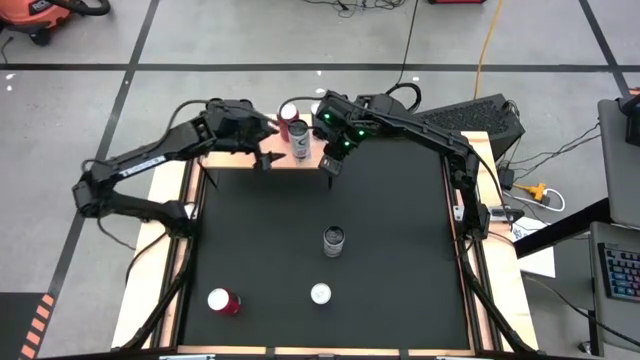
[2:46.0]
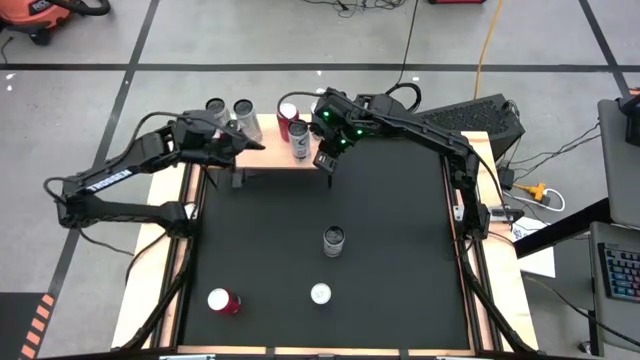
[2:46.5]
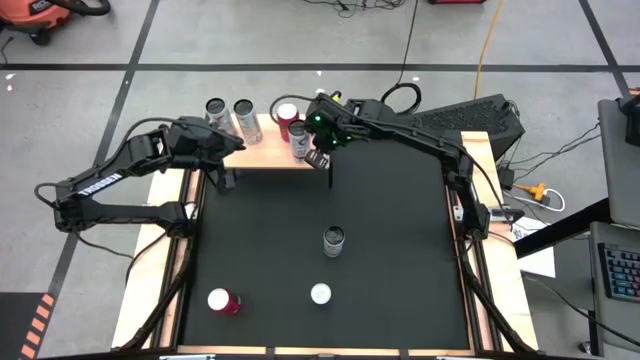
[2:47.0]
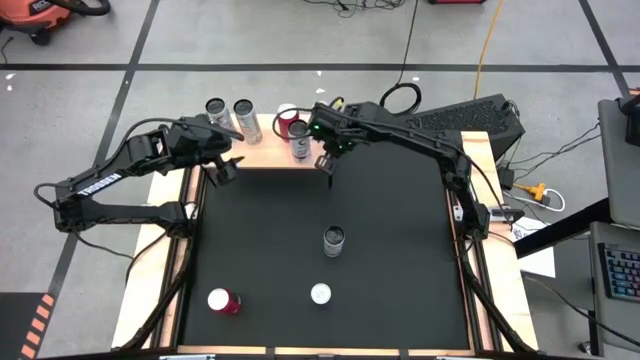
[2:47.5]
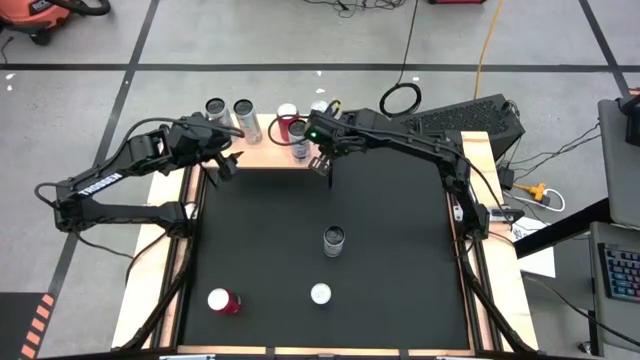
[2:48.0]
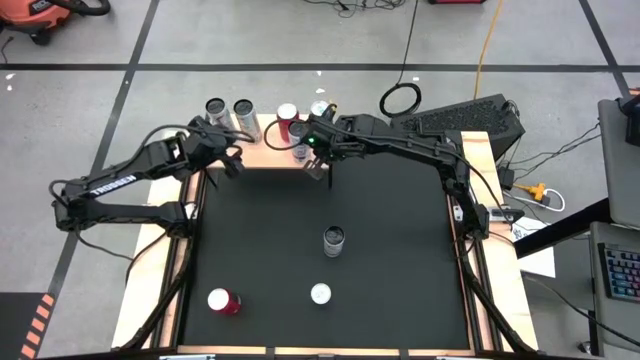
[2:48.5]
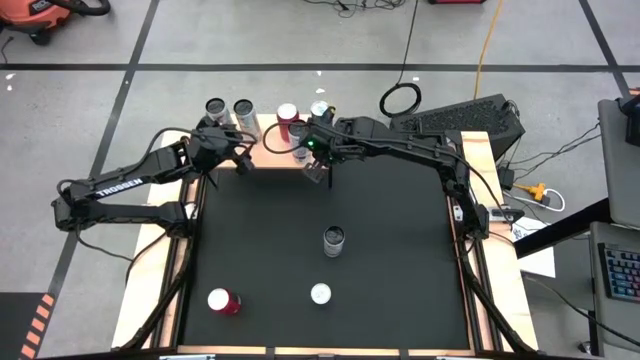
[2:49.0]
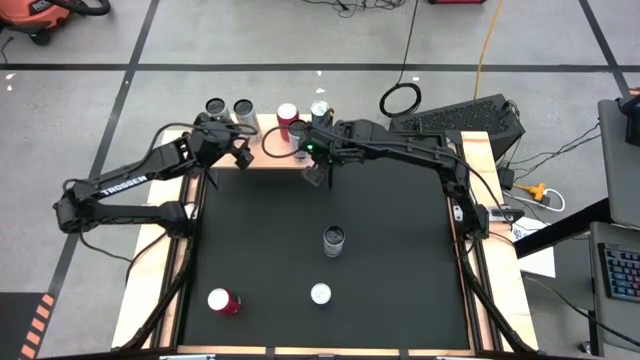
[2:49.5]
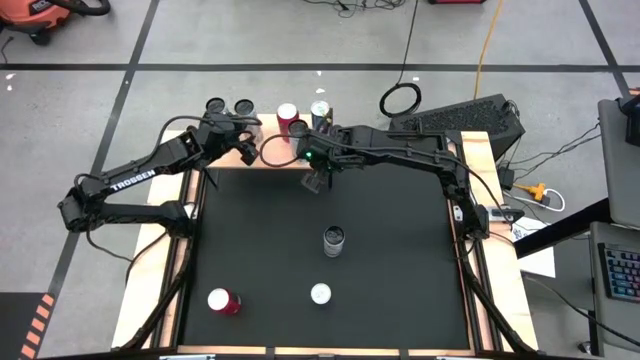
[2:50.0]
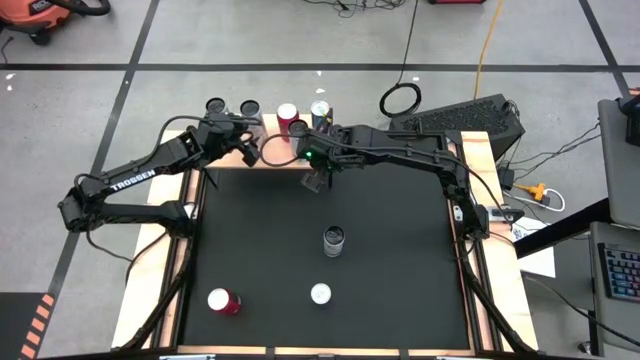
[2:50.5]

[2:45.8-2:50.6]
Task: Place canned beverage on shelf
Adjust the white yellow soda can on the shelf

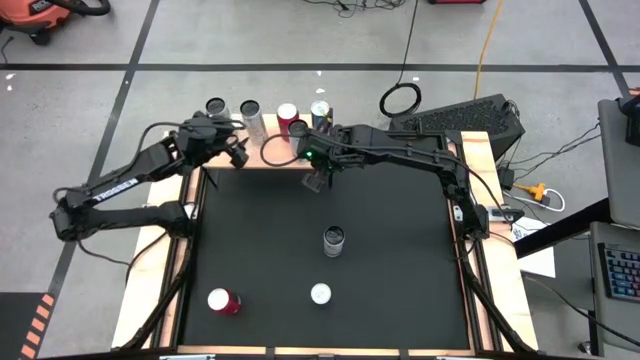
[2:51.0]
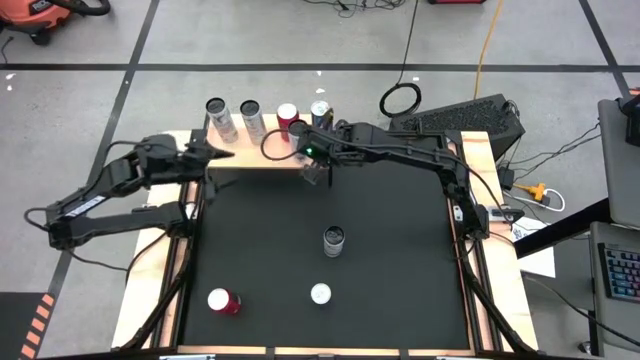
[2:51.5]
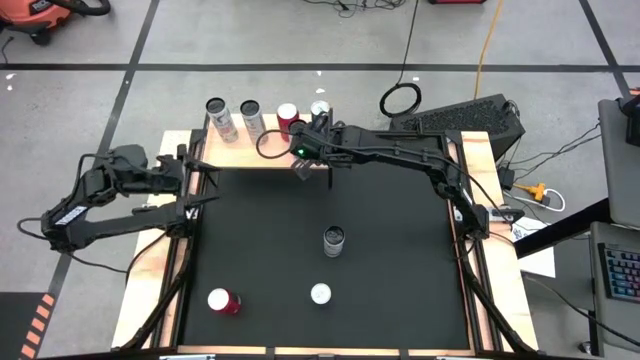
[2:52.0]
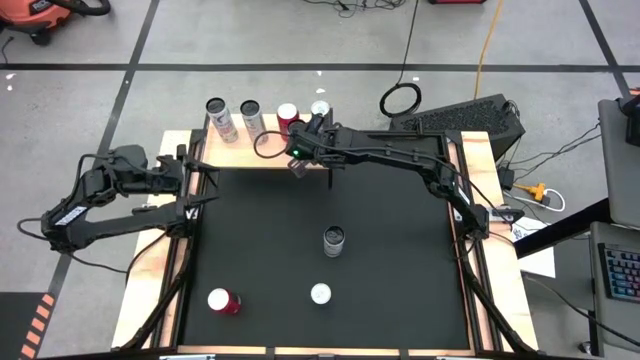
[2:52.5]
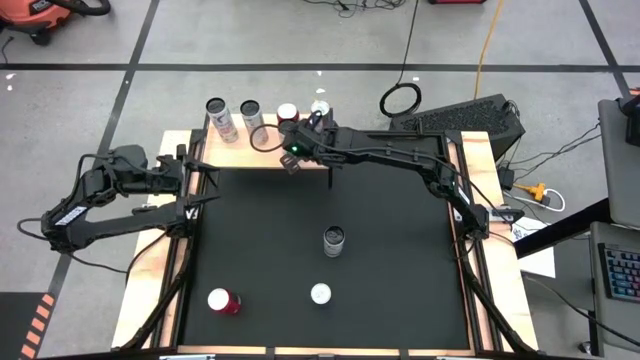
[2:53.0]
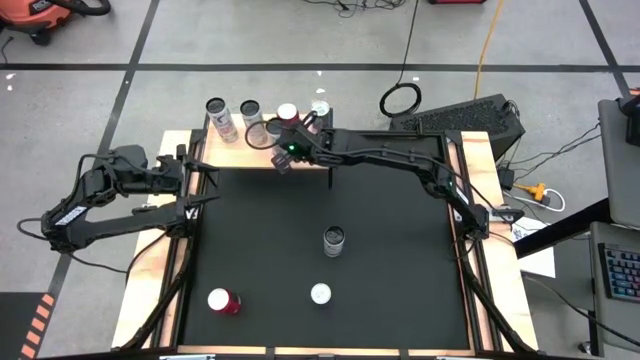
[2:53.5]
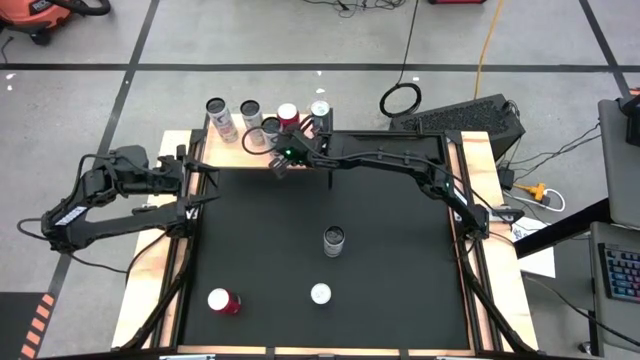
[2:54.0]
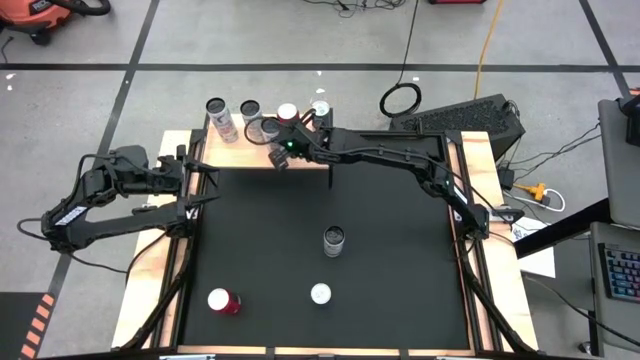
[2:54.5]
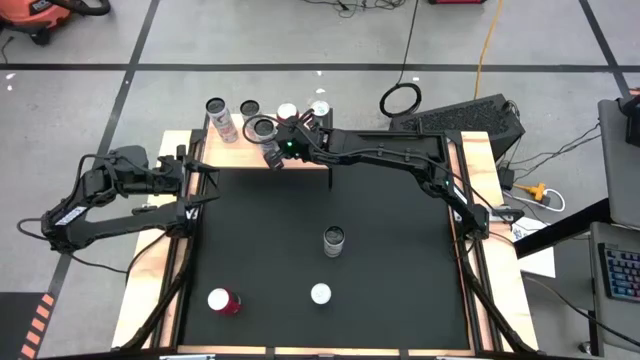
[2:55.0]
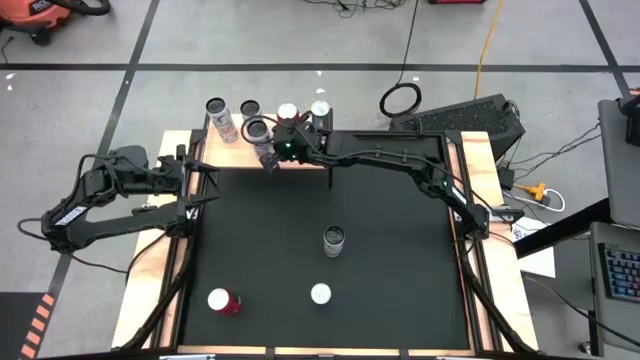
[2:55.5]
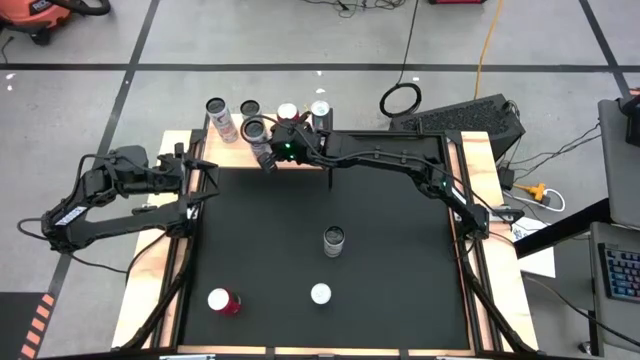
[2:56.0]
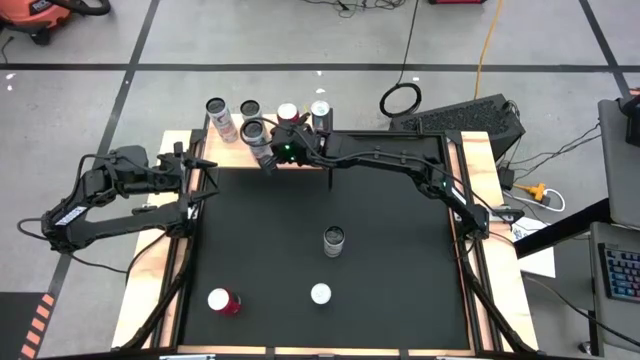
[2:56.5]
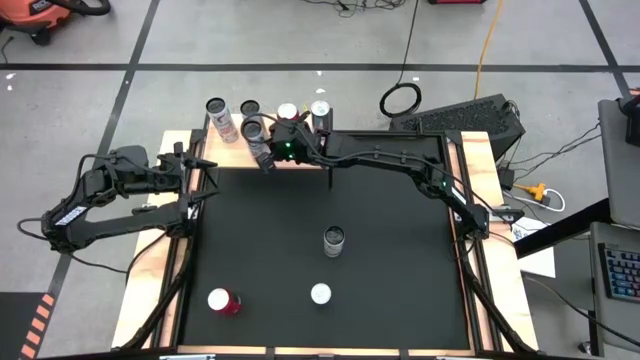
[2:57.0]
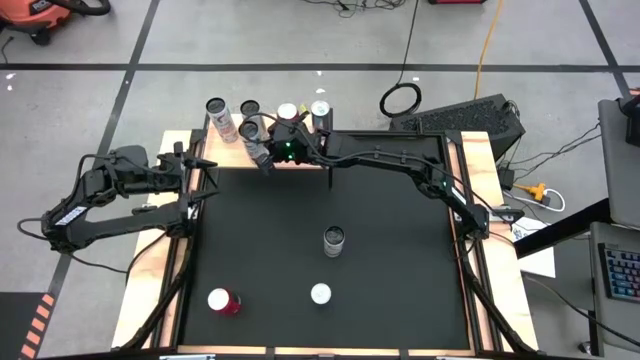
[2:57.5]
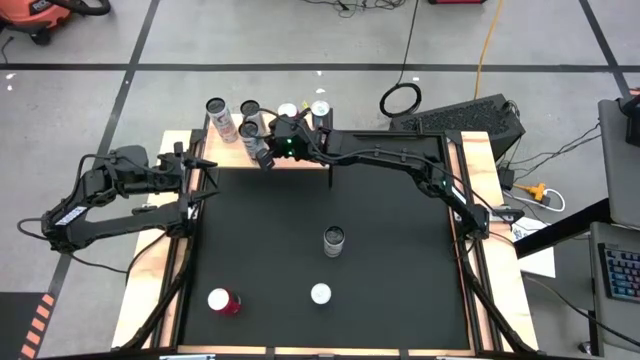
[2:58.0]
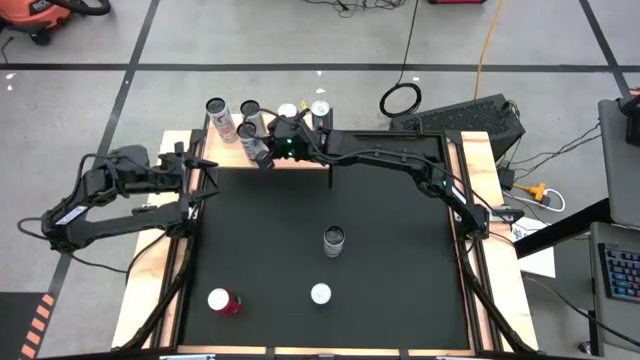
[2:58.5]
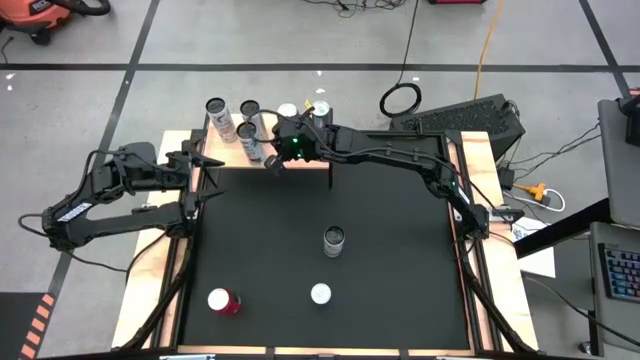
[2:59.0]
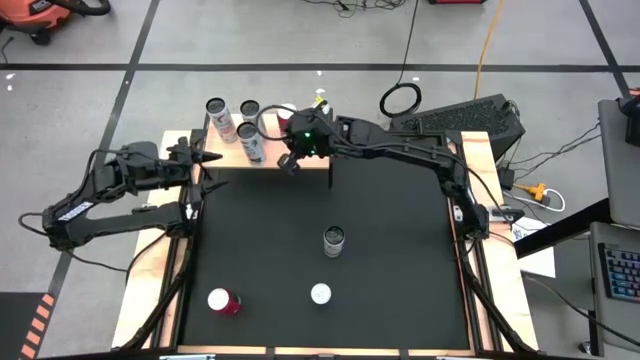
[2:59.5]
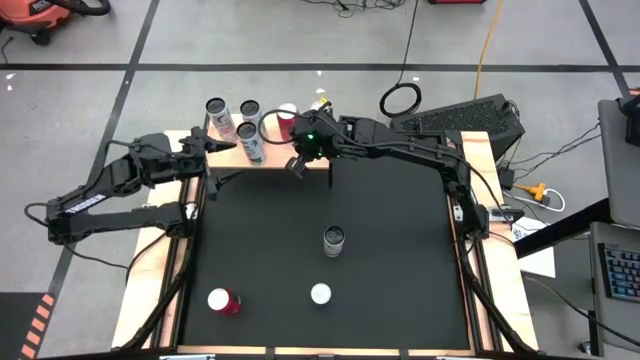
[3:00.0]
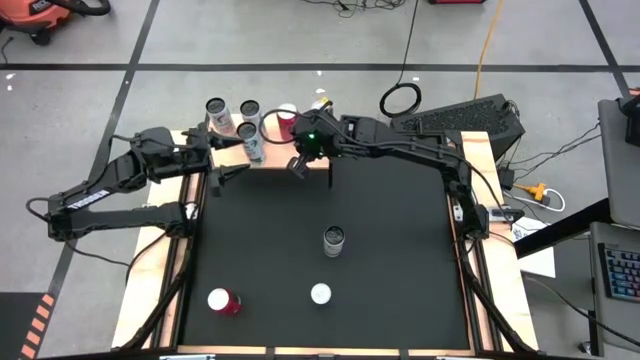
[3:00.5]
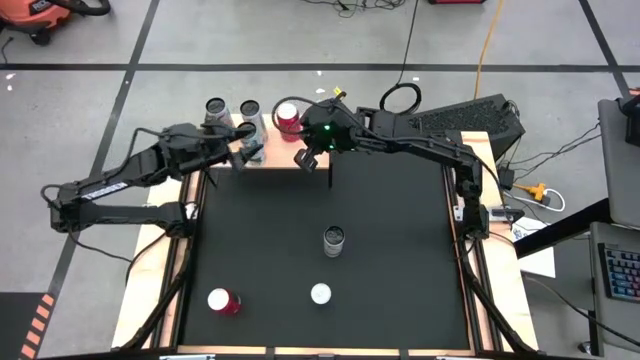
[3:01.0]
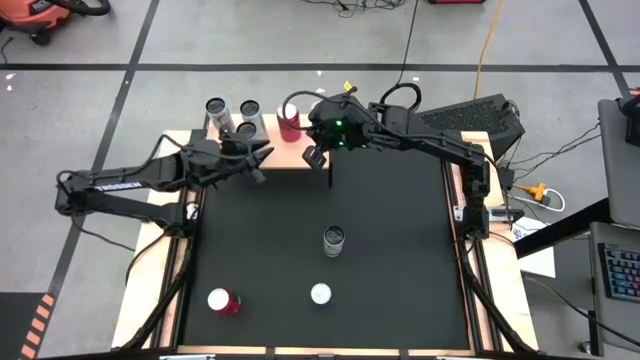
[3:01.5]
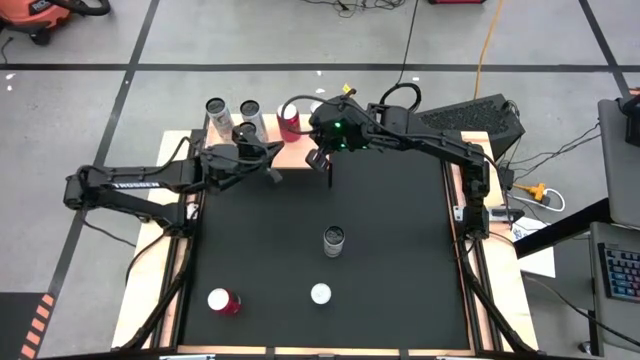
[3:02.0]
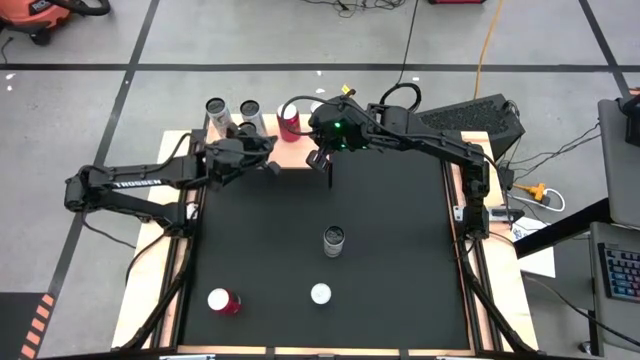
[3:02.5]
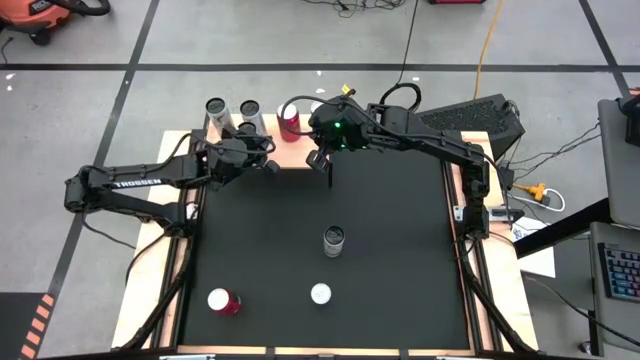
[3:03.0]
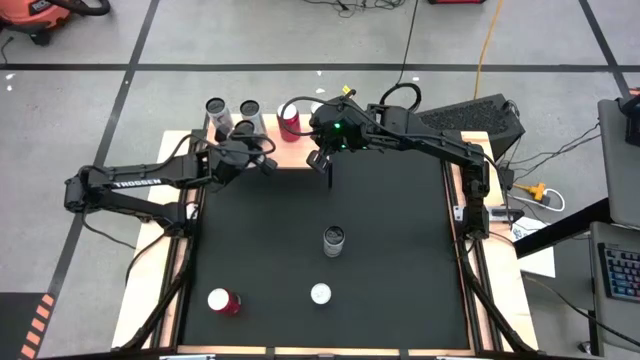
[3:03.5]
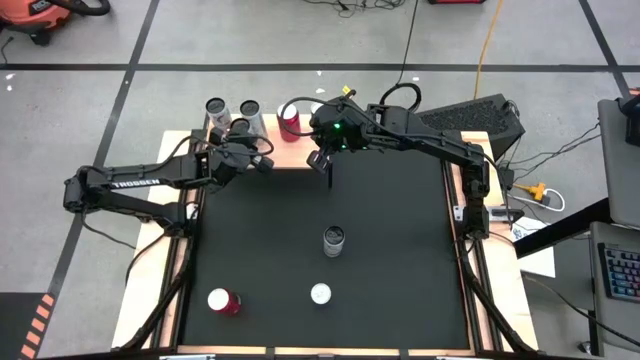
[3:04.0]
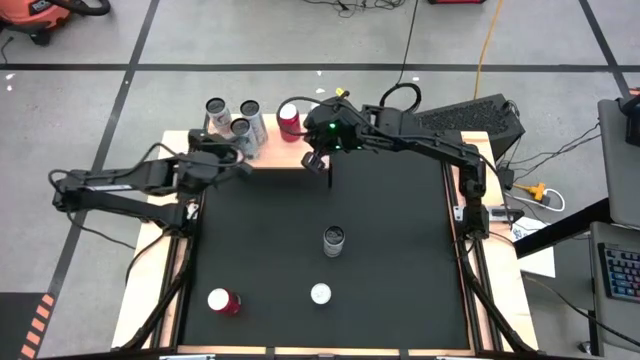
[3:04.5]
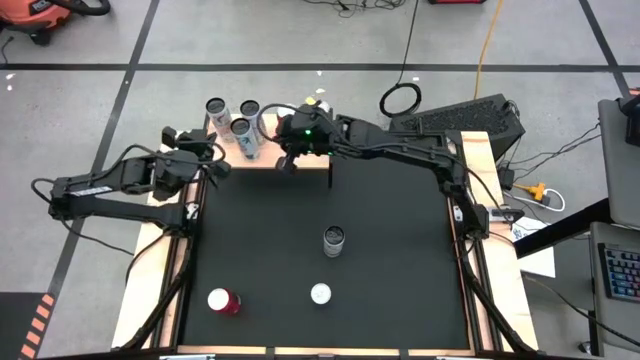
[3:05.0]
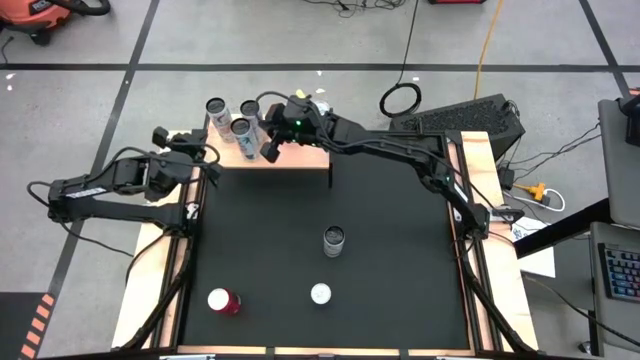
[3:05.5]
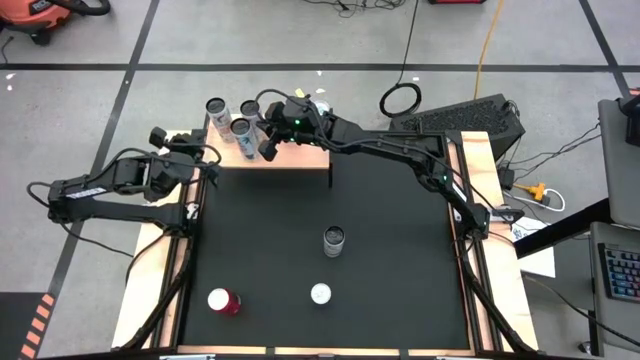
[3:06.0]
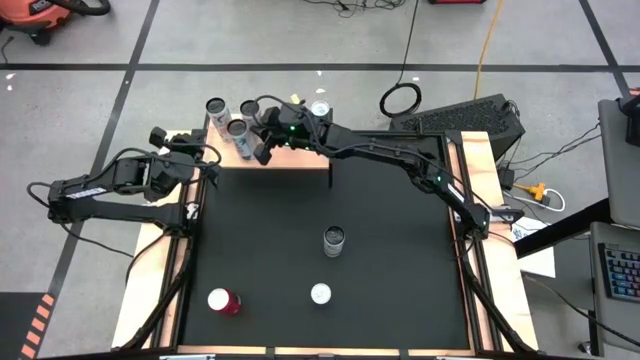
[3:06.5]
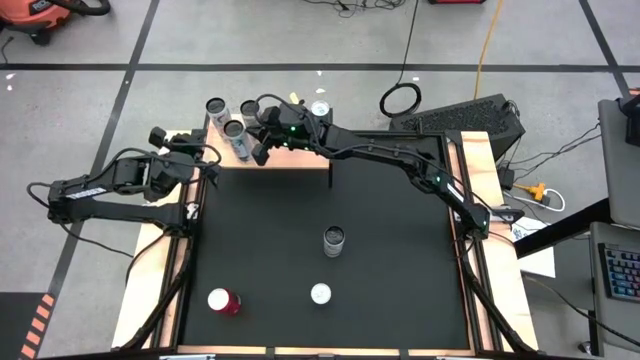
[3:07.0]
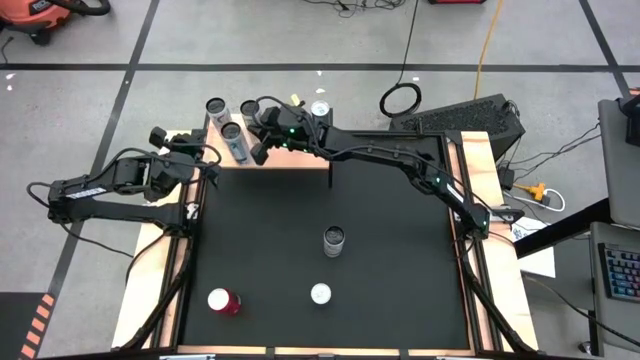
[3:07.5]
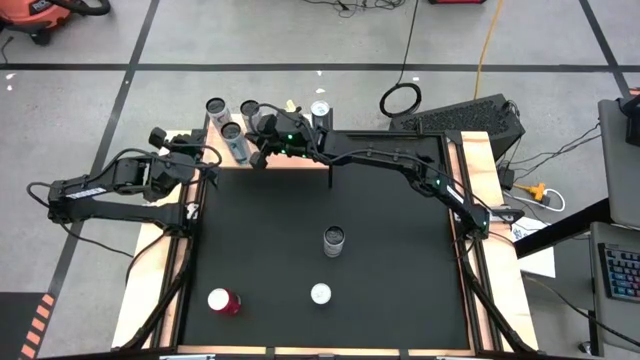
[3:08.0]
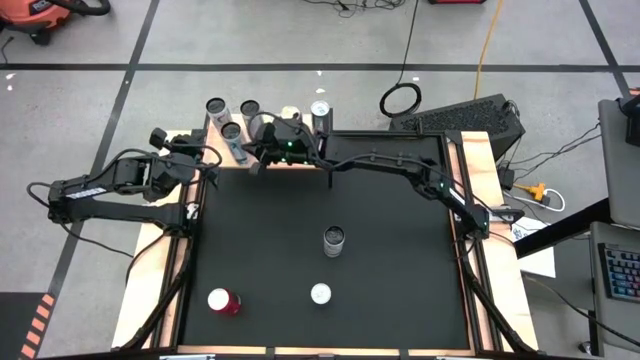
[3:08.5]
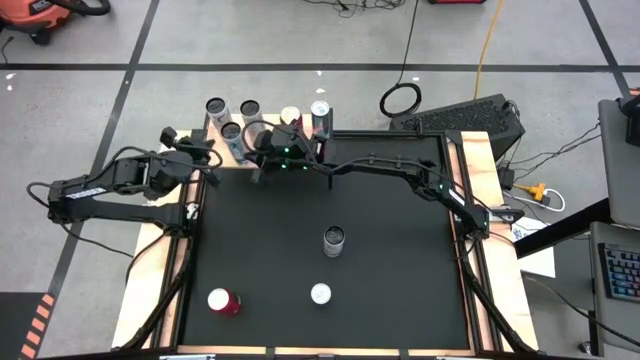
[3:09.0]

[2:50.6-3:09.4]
Adjust the white pink soda can on the shelf
